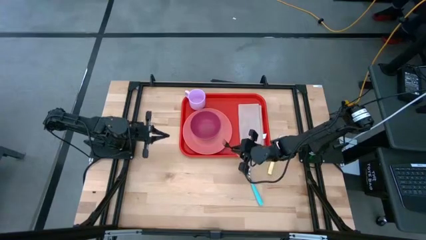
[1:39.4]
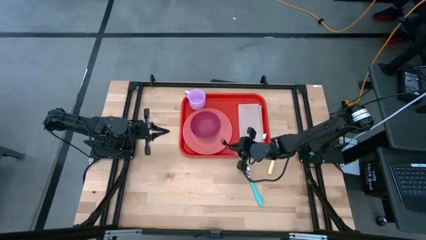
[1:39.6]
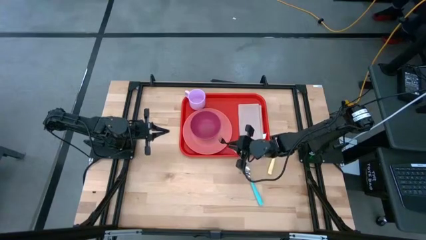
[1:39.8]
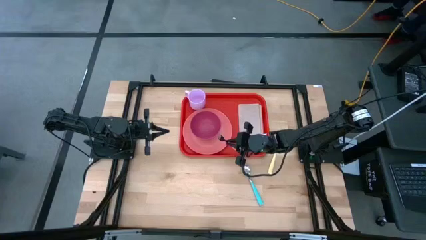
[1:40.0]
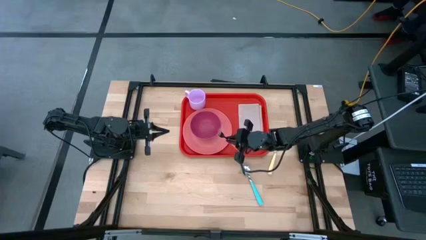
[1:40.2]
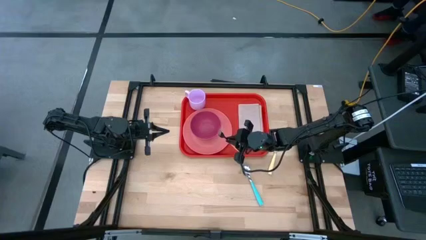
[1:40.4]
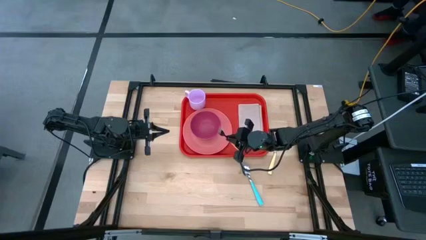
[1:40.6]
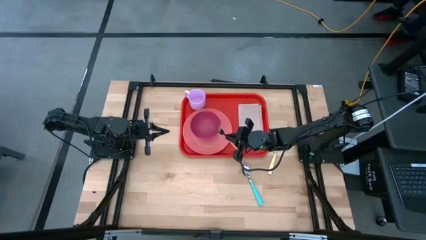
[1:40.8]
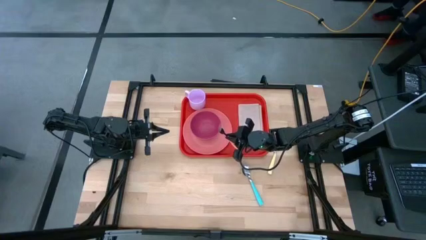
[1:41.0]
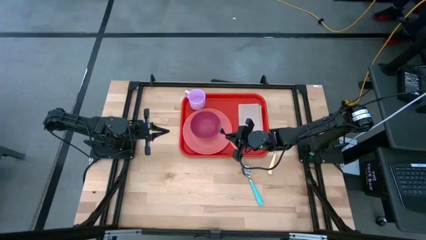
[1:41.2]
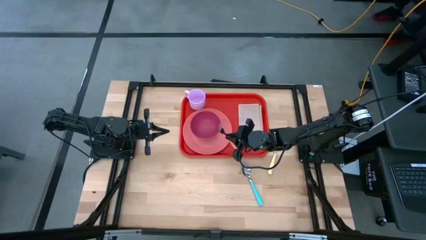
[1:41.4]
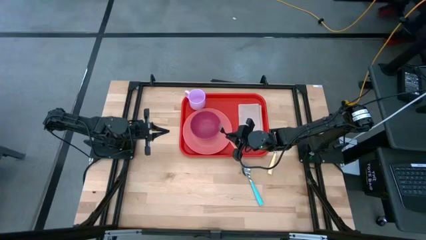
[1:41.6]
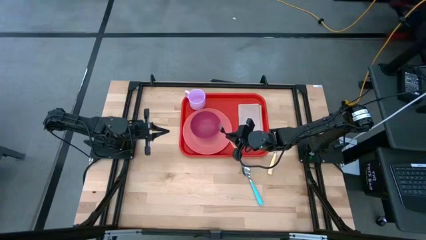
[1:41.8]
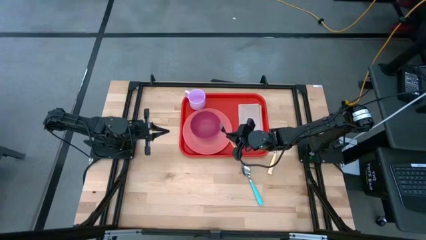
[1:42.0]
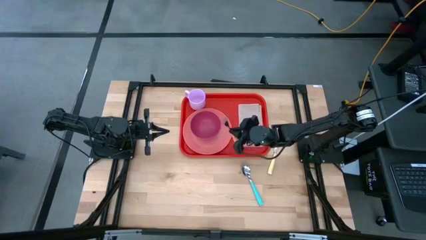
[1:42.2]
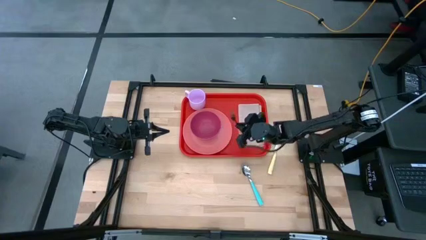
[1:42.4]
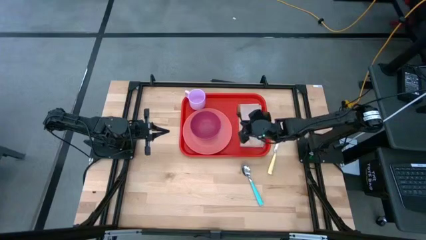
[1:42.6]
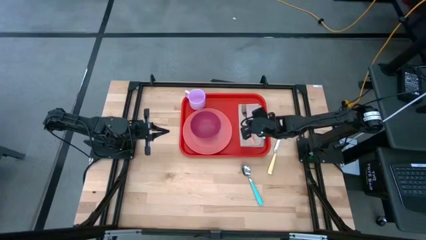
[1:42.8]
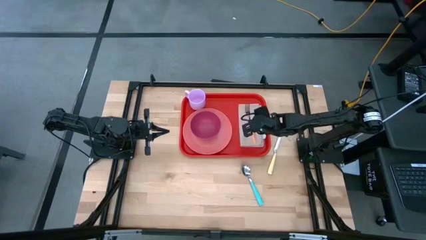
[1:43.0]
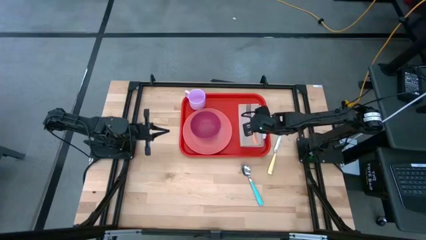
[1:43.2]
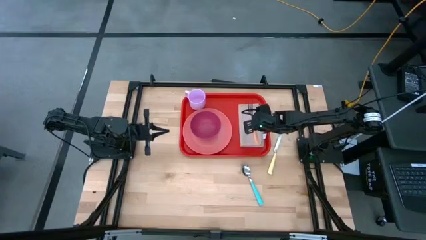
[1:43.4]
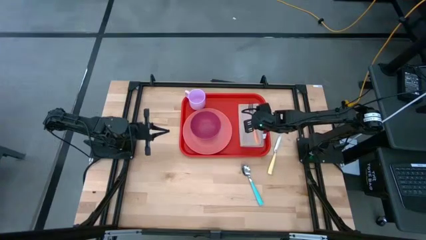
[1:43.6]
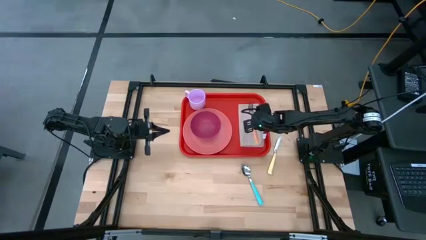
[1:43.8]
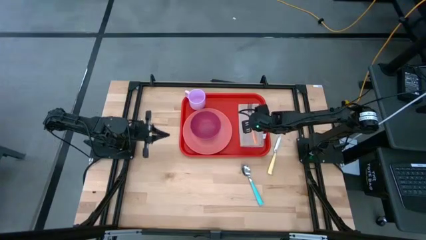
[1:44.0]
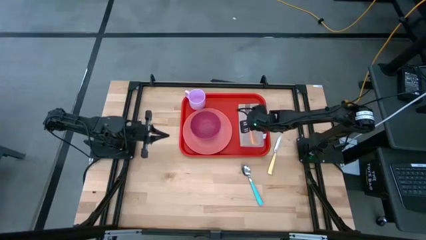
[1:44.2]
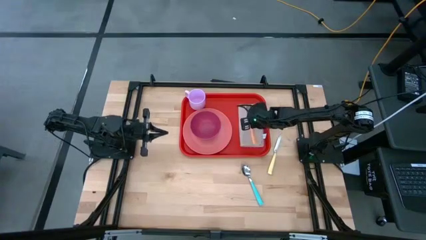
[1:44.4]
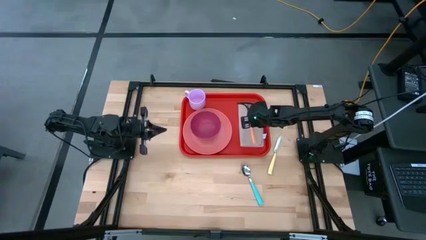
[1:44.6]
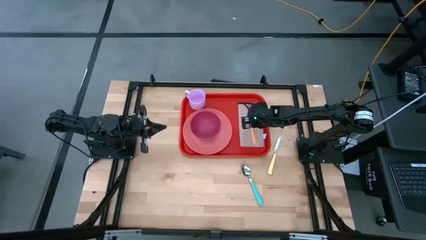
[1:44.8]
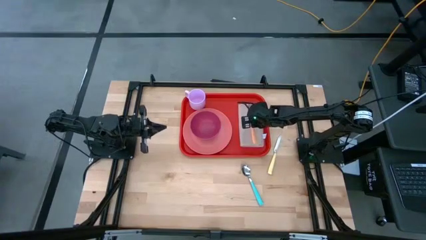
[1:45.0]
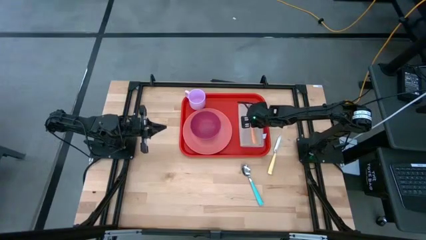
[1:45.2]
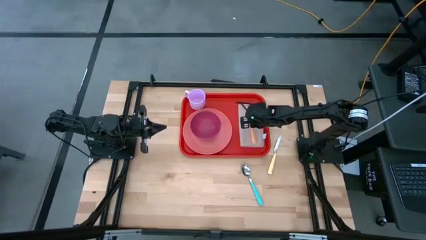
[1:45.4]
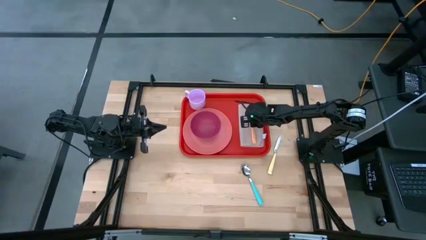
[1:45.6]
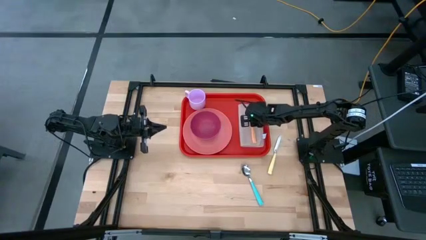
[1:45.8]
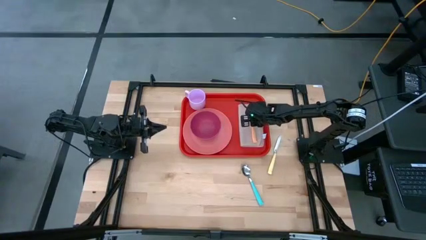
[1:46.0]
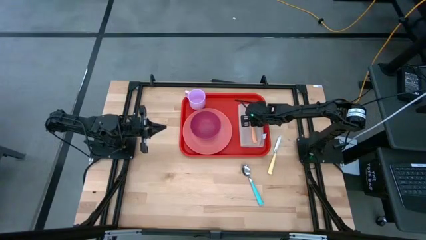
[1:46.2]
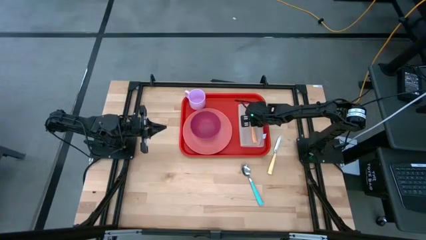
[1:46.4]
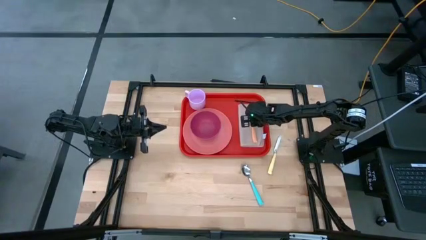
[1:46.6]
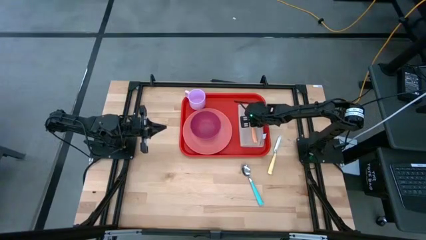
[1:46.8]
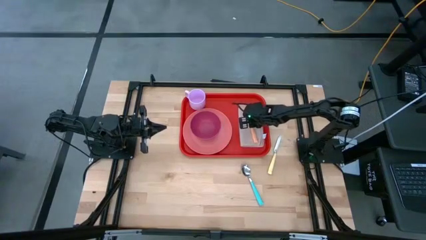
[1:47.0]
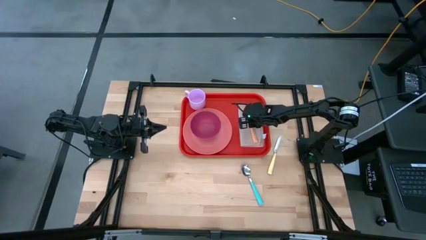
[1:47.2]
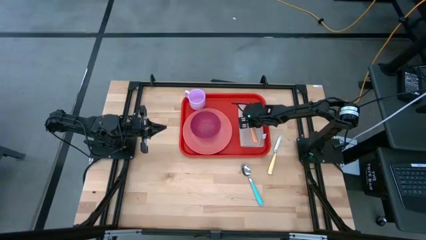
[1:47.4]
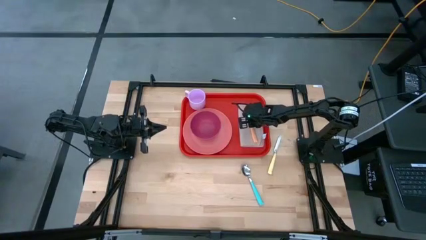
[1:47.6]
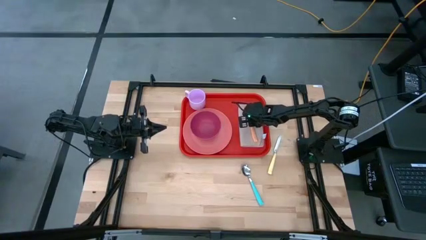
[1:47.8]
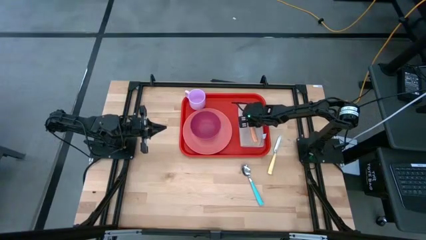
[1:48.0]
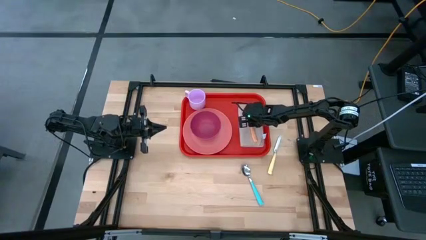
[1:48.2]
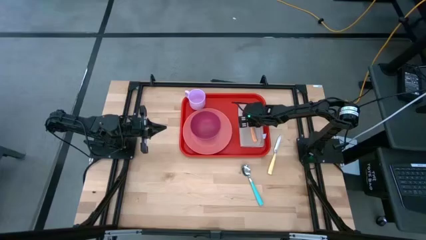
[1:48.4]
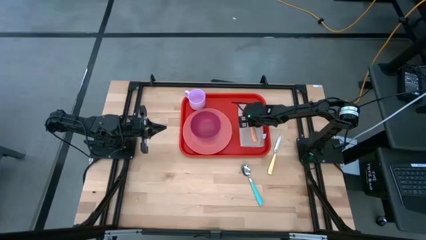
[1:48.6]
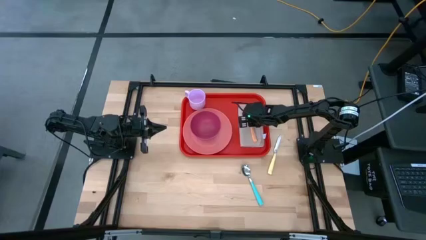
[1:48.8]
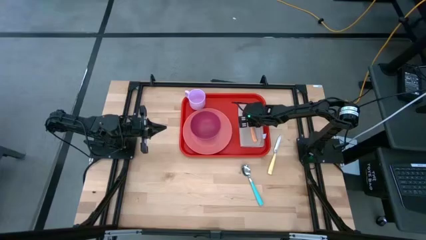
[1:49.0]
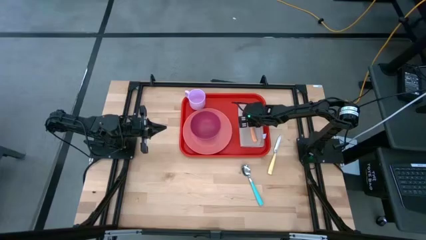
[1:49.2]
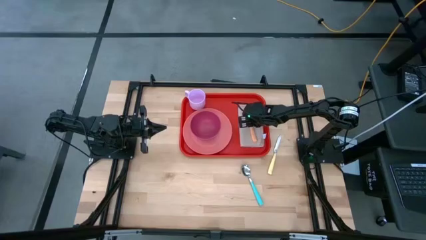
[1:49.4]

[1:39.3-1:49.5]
Task: Set up tray
Put the orange fork on the brown table napkin

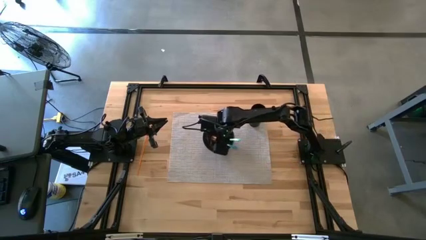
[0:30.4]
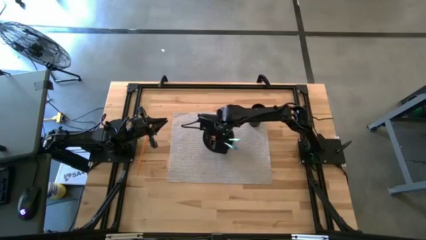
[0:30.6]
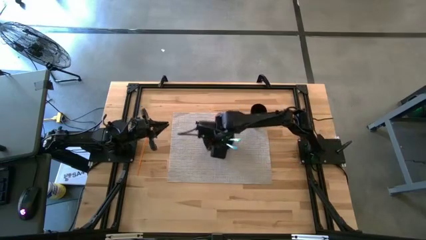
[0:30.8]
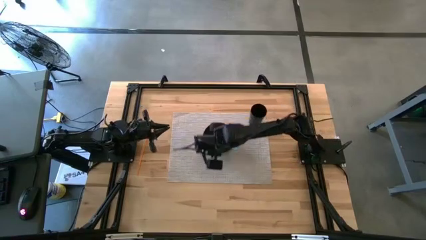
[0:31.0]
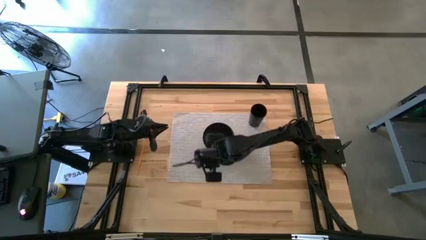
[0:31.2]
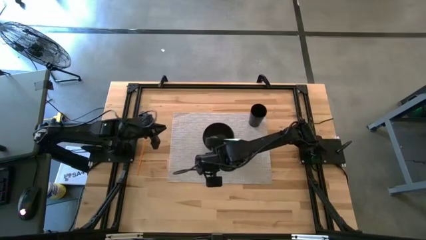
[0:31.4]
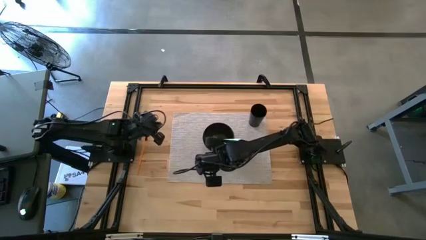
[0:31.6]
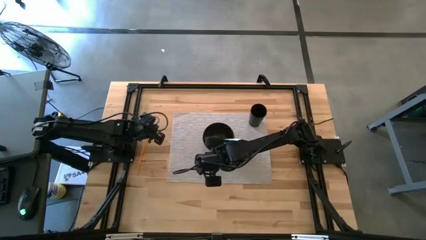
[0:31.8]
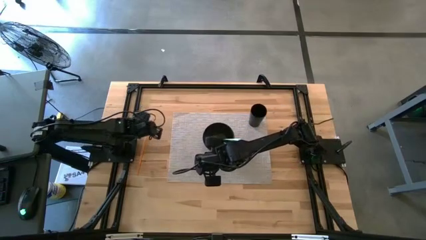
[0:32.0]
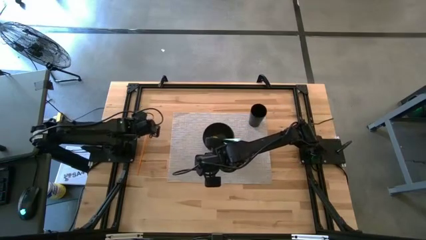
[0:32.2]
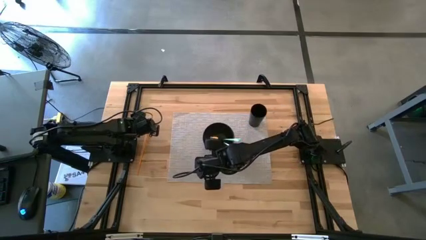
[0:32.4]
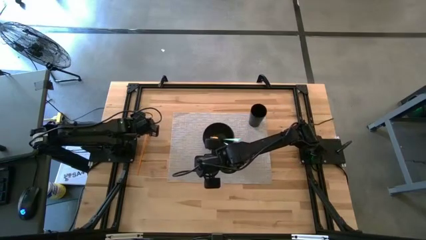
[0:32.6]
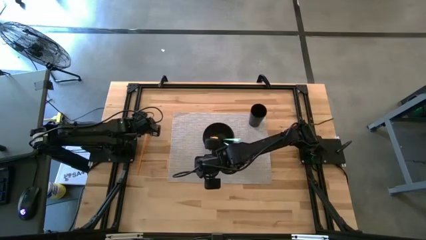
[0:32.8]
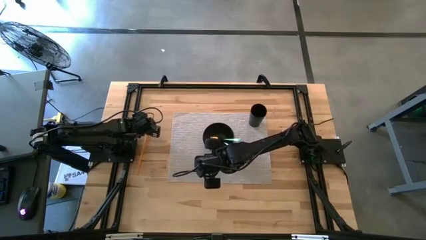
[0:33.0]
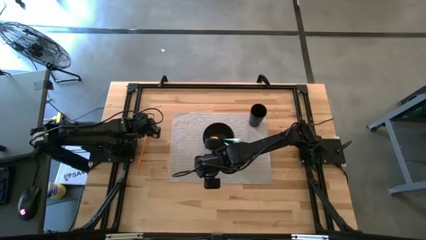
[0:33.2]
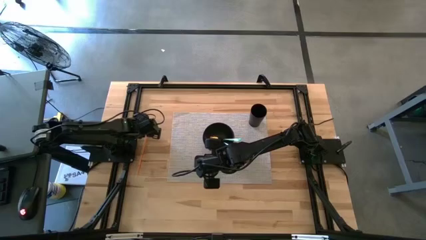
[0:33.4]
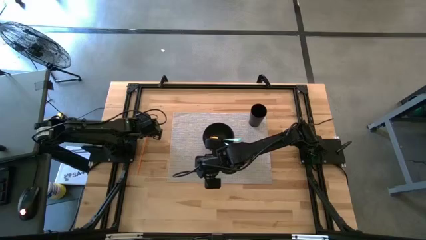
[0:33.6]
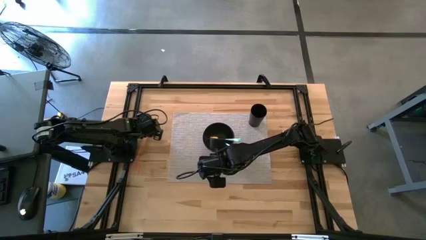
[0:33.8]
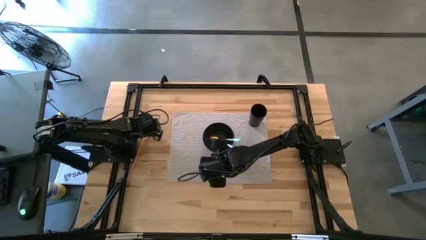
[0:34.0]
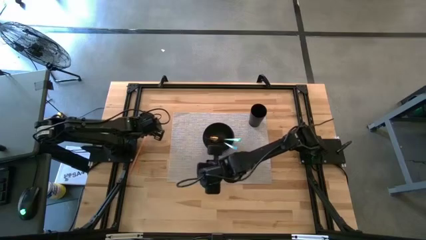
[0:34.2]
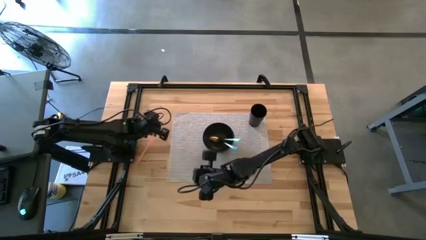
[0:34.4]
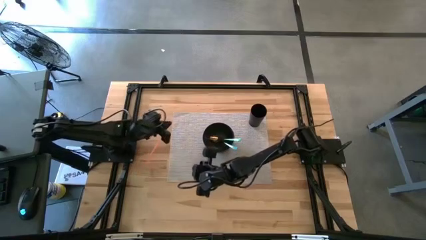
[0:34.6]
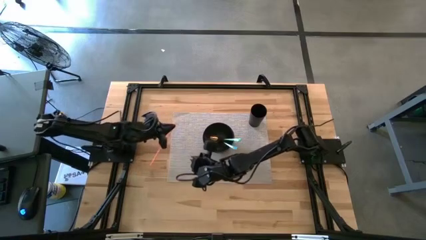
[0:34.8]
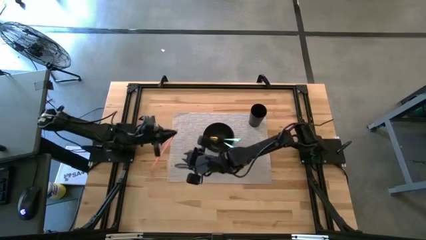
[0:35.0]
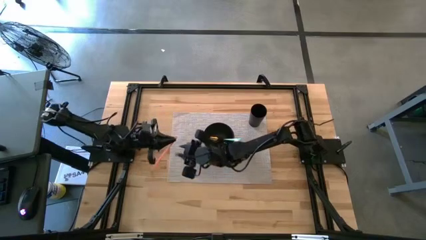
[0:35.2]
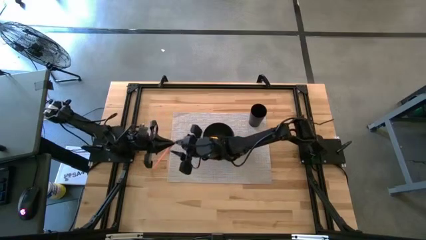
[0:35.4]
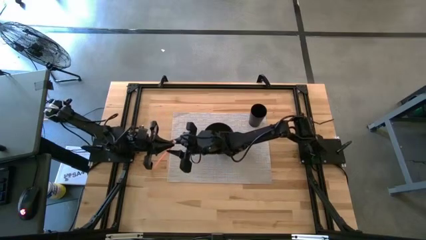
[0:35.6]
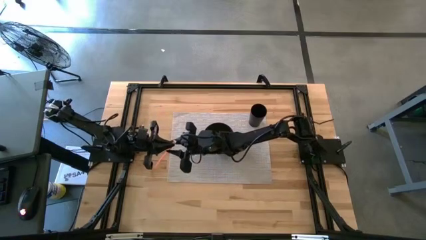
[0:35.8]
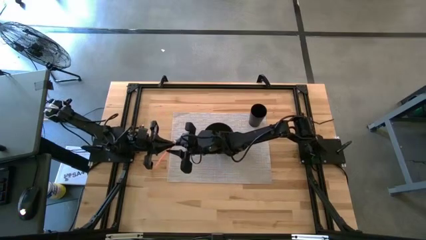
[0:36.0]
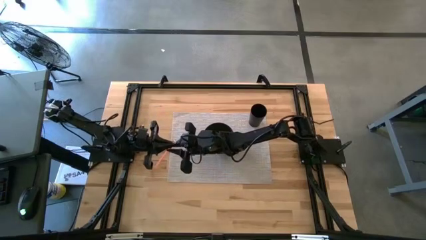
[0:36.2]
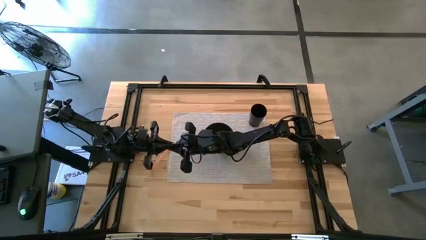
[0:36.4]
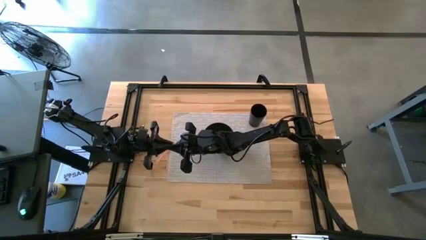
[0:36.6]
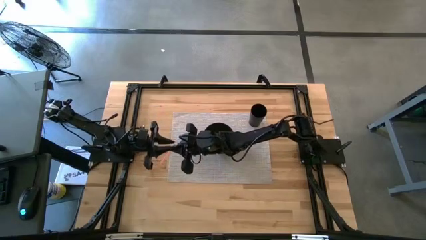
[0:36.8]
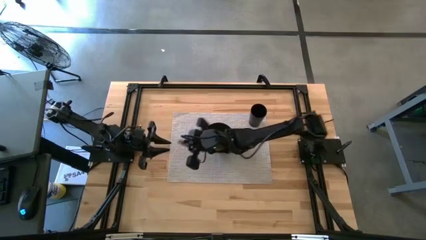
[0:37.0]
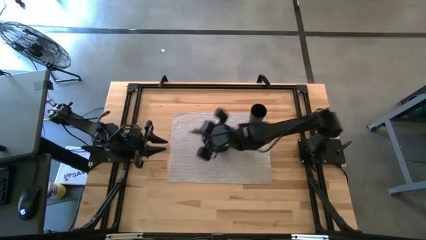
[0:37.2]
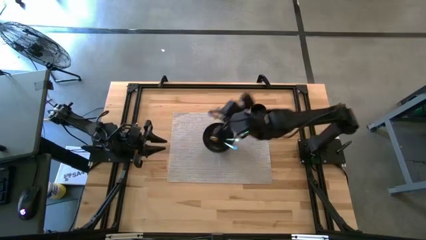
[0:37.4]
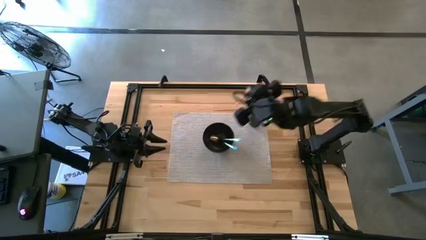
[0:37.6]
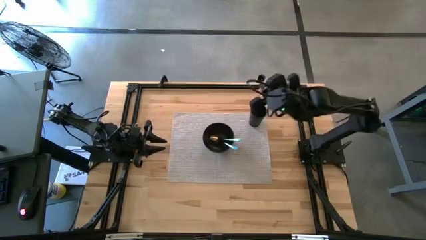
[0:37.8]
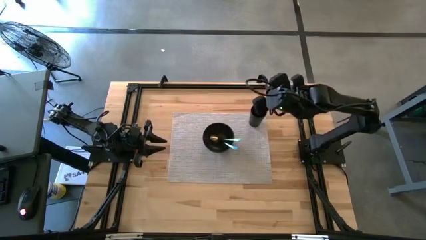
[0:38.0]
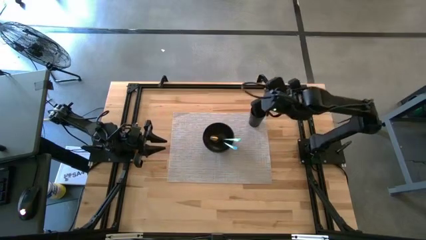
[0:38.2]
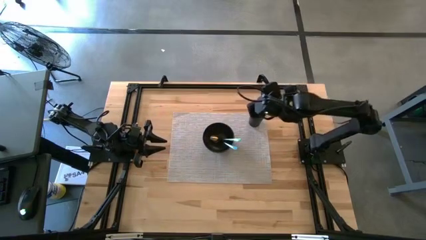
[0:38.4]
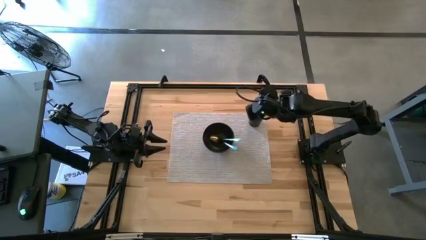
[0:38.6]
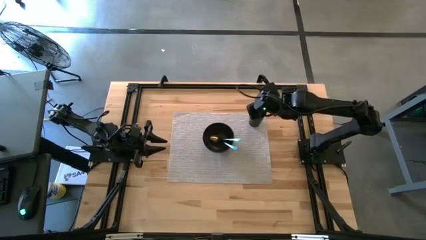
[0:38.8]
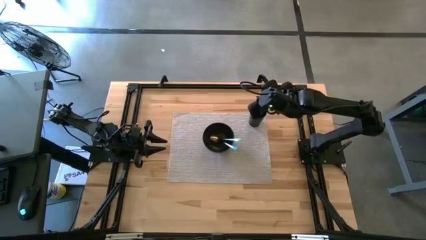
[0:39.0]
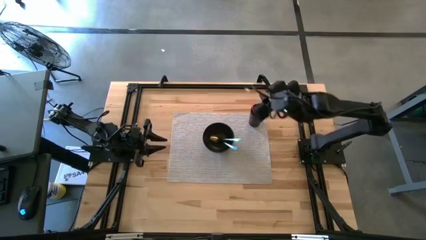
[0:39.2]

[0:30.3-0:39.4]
Task: Pick & Place Utensil
Put the orange straw into the black cup on the gray mat
